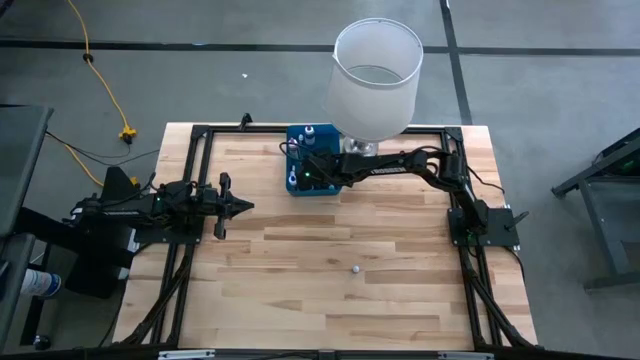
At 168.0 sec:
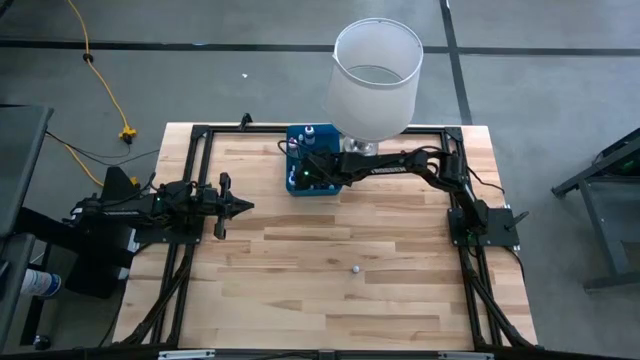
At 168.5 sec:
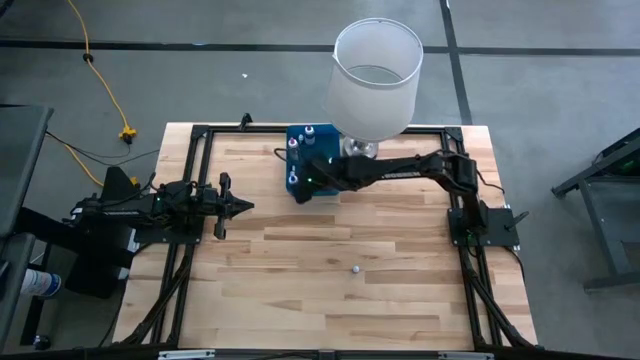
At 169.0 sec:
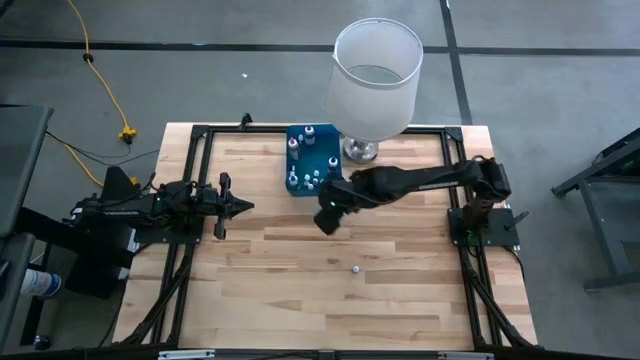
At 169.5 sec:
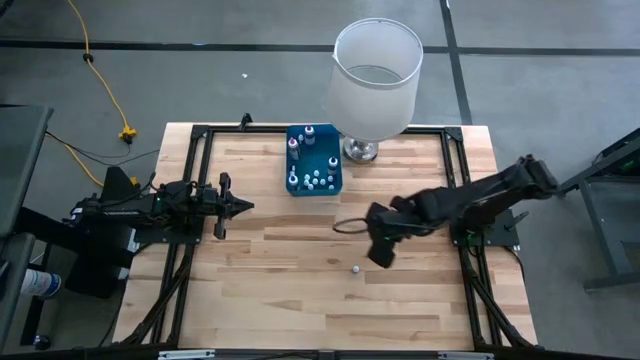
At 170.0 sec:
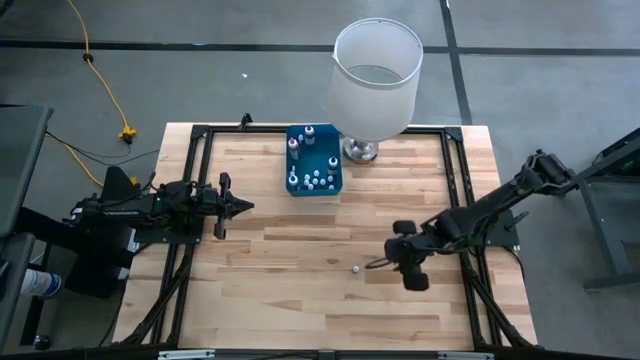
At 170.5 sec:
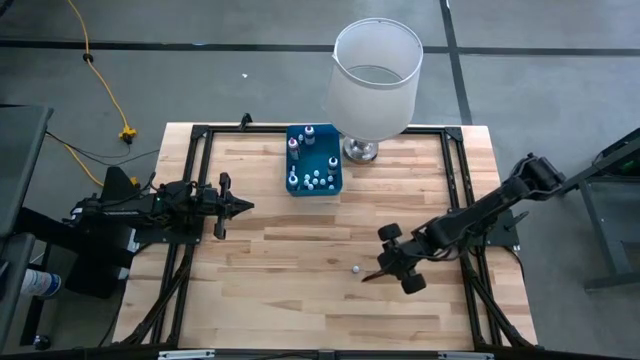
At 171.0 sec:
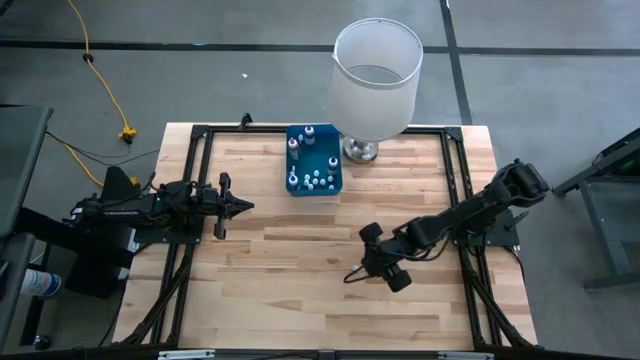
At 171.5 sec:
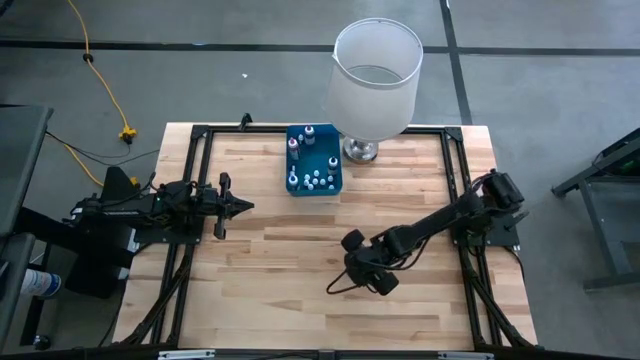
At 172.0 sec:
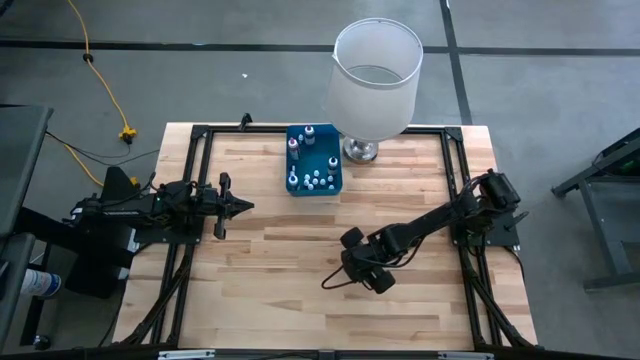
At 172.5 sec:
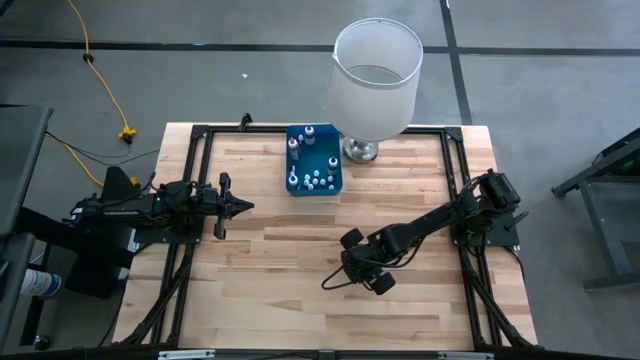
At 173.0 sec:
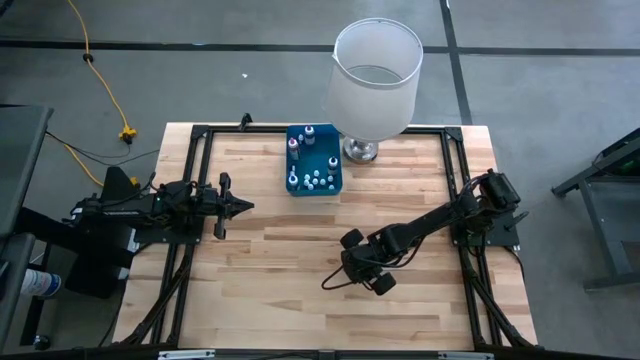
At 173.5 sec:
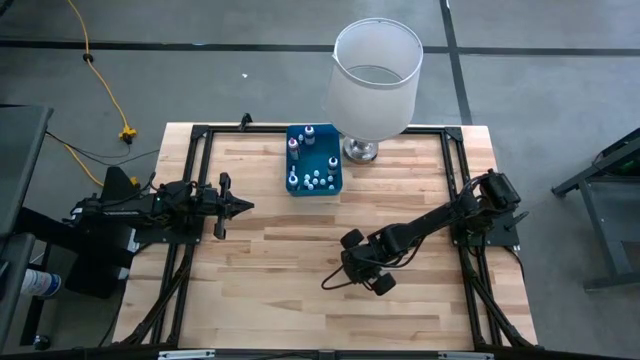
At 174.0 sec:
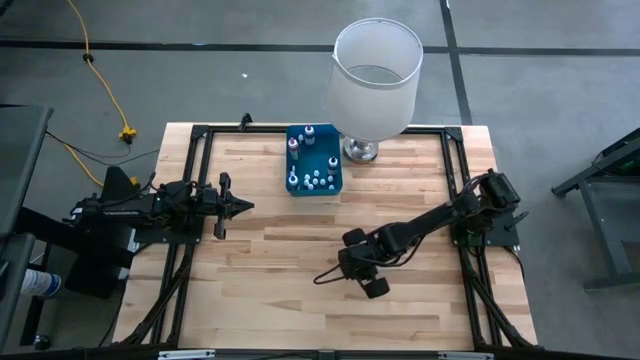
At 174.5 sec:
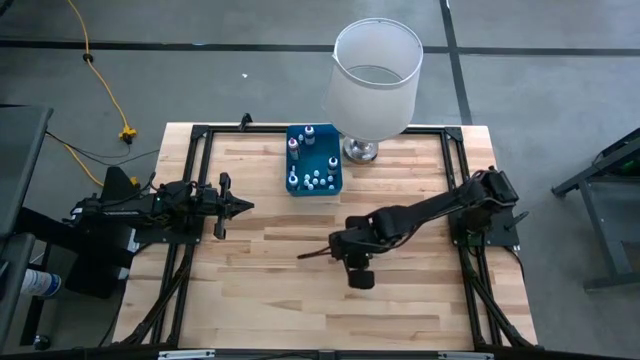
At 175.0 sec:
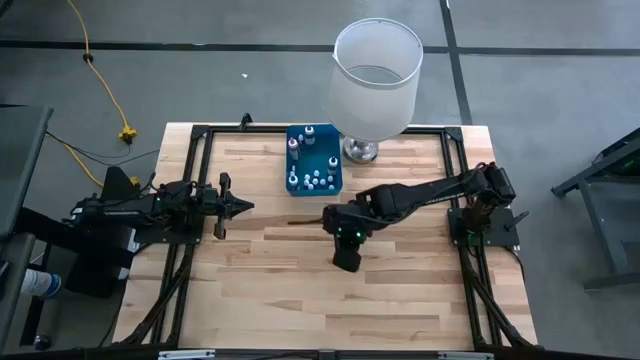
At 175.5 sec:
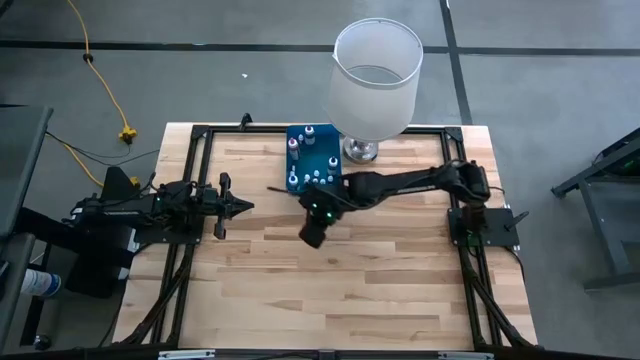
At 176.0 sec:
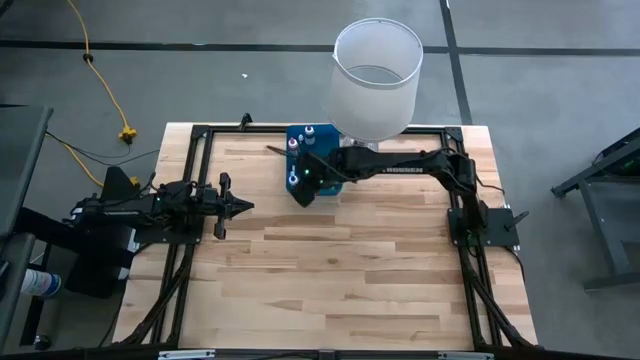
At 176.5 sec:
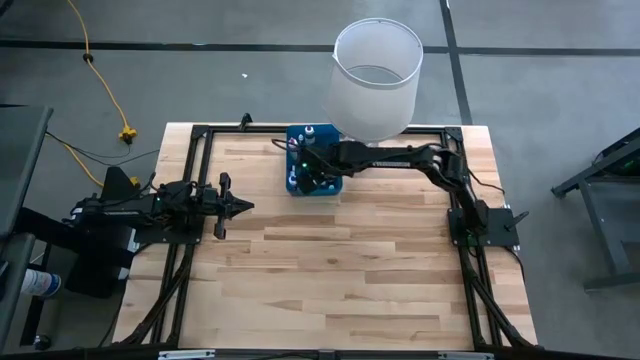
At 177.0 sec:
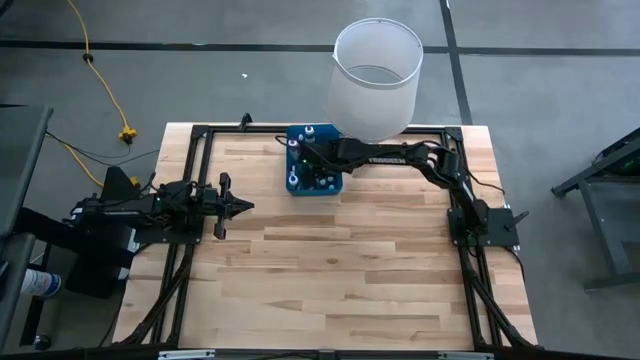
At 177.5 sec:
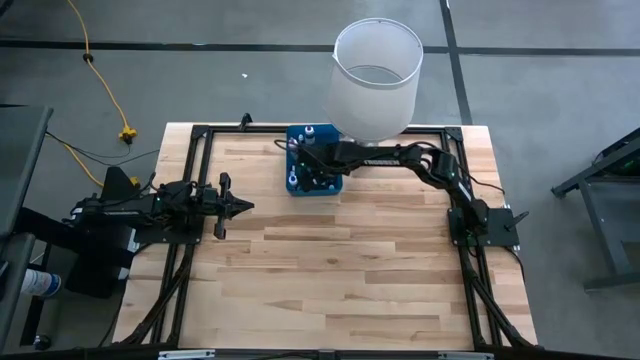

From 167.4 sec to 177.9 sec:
Task: Pick & Place food coloring
Put the small blue food coloring bottle into the blue bin

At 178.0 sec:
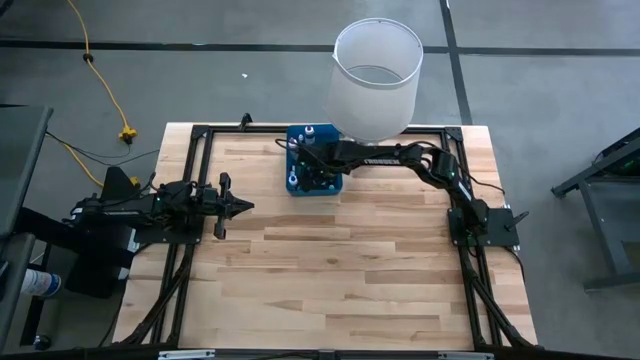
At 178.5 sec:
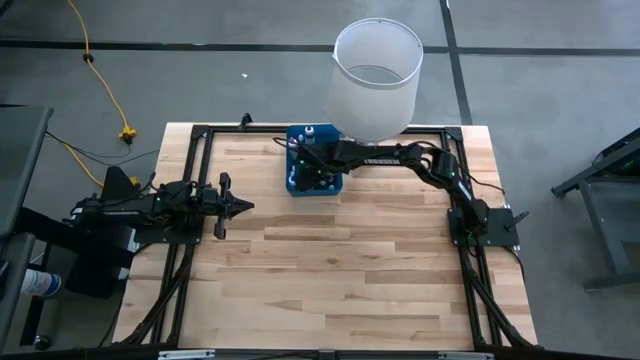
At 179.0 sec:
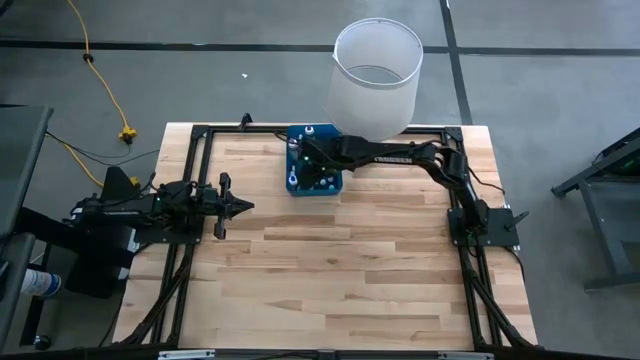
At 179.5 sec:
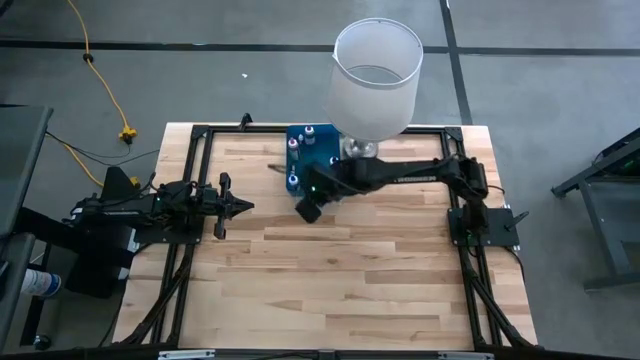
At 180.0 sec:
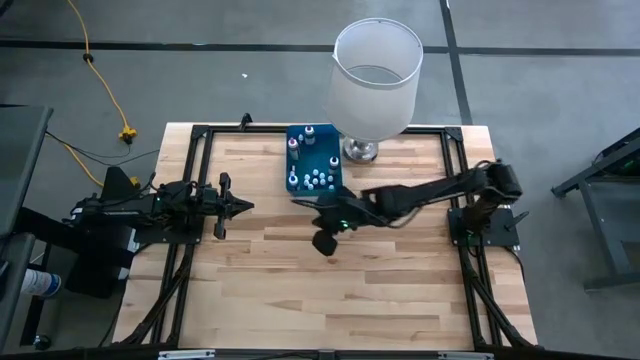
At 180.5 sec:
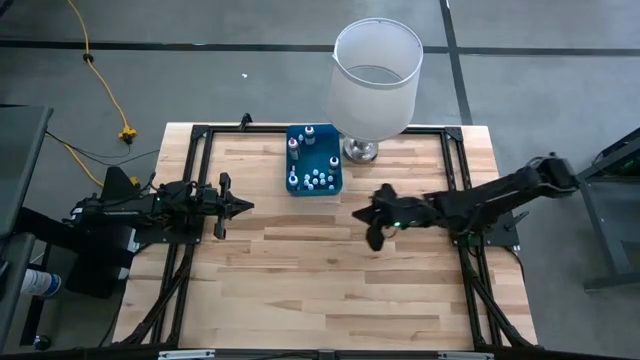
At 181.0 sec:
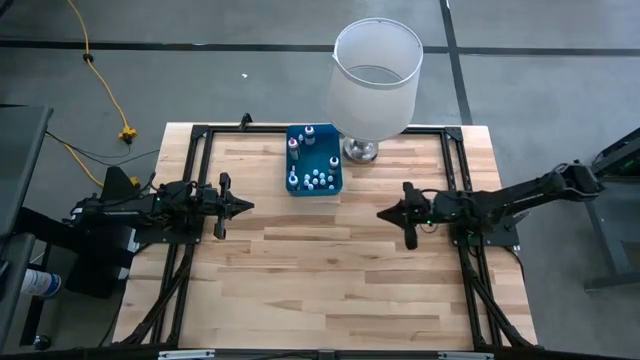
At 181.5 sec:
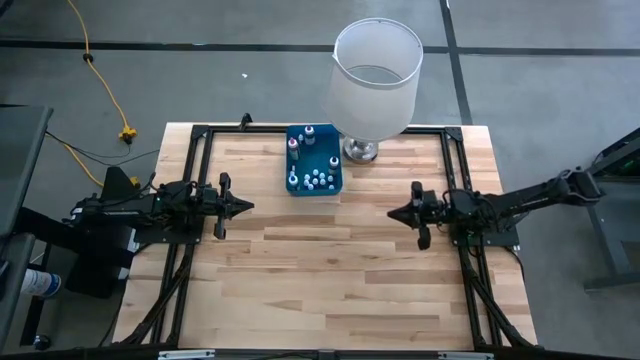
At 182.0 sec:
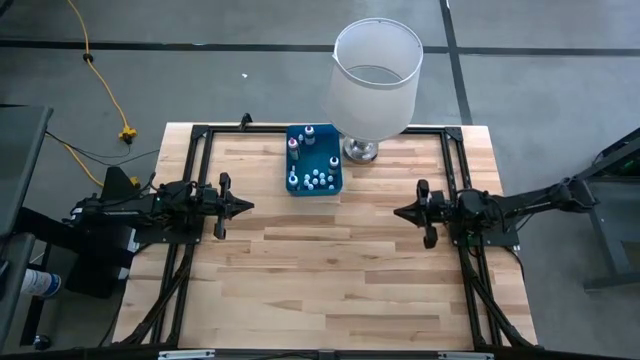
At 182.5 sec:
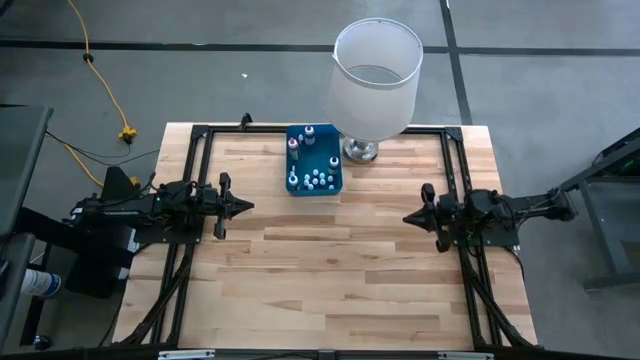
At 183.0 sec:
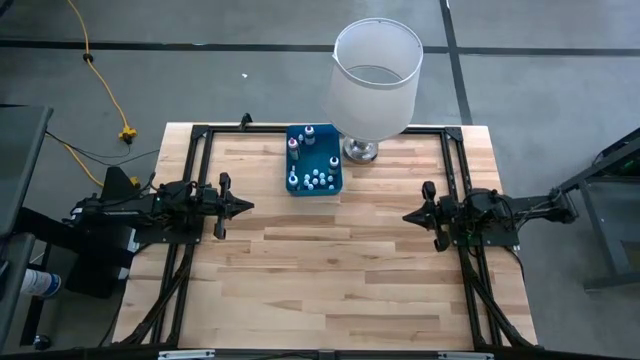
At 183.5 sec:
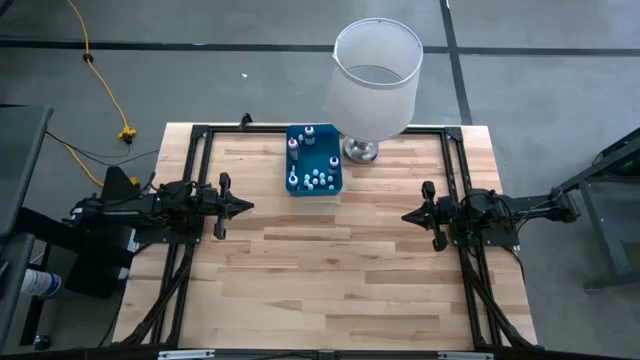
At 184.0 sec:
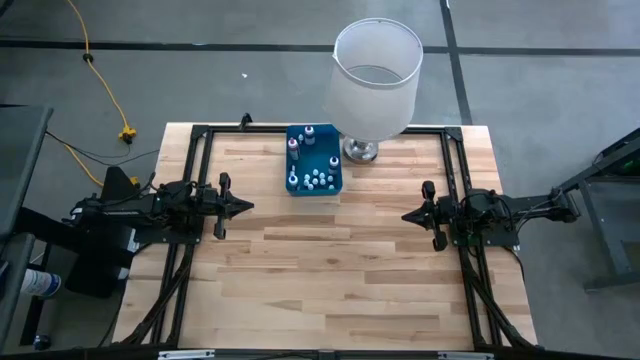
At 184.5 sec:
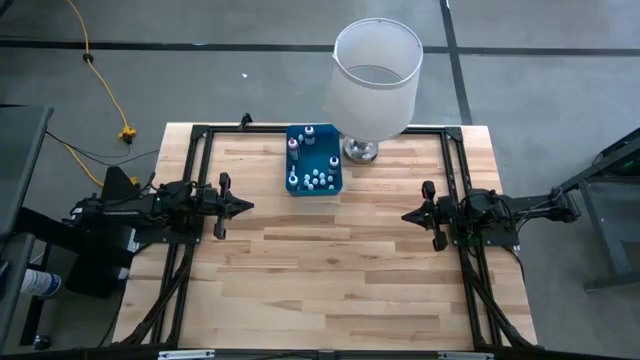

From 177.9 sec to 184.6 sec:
Return to Home Position
